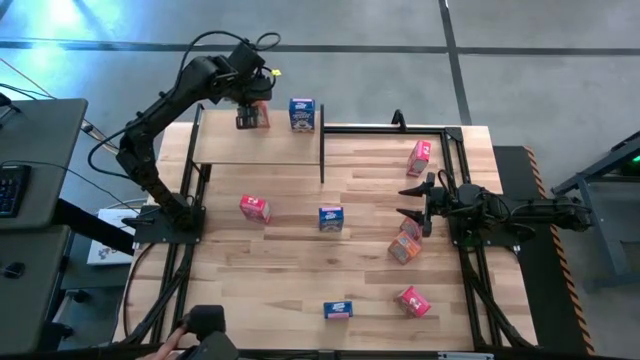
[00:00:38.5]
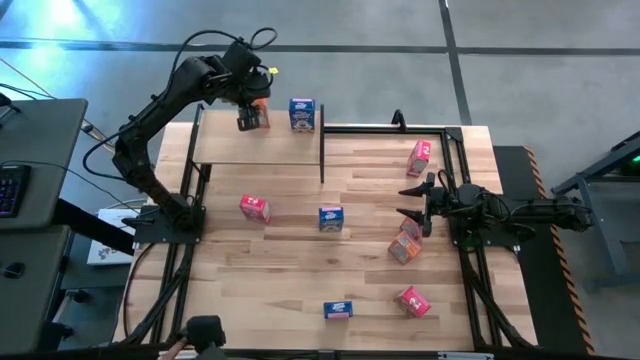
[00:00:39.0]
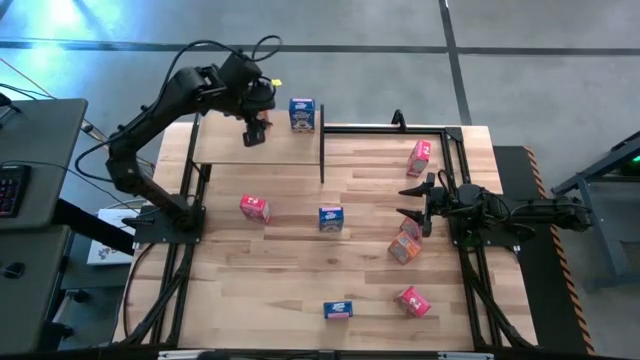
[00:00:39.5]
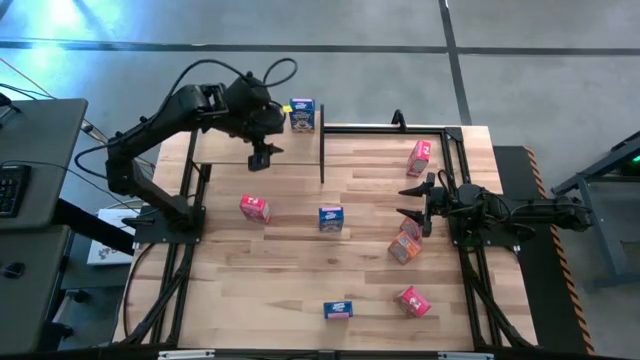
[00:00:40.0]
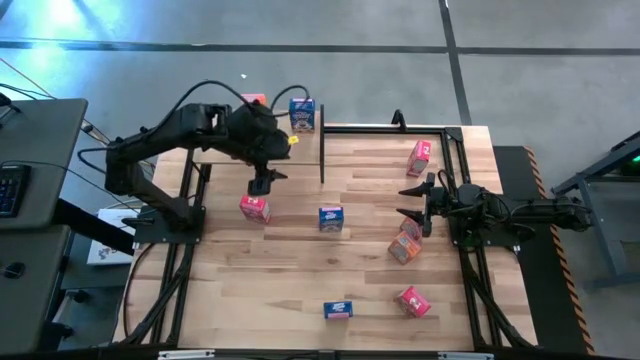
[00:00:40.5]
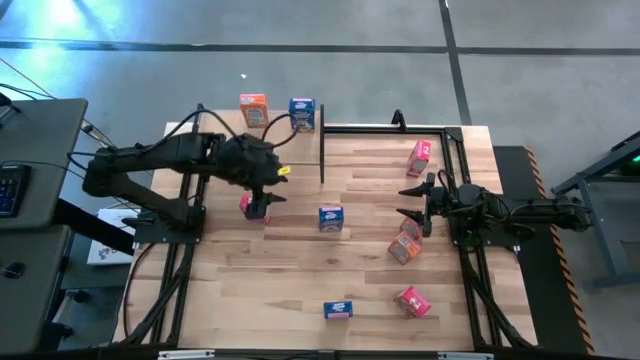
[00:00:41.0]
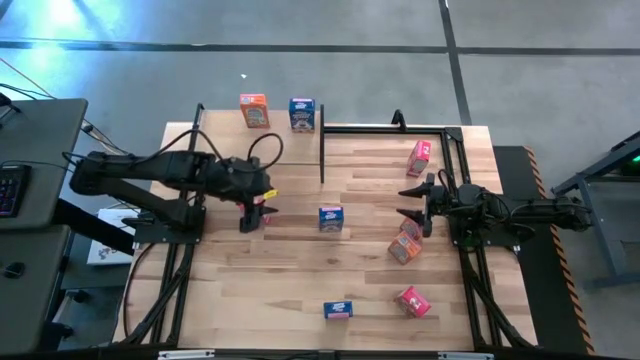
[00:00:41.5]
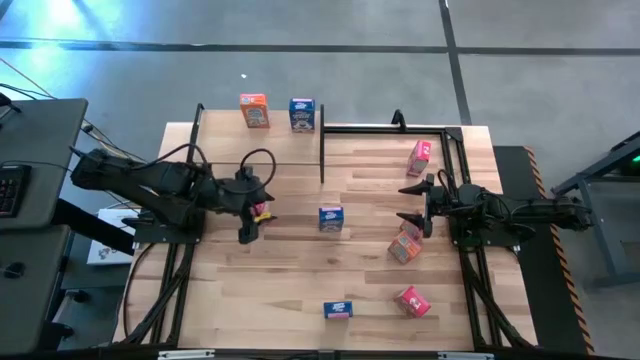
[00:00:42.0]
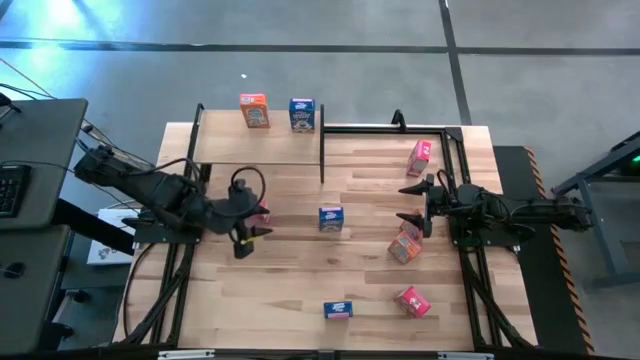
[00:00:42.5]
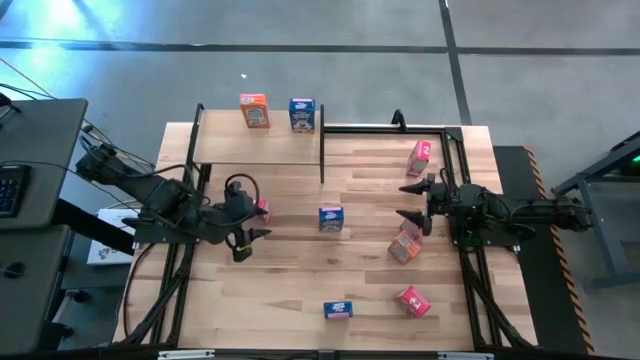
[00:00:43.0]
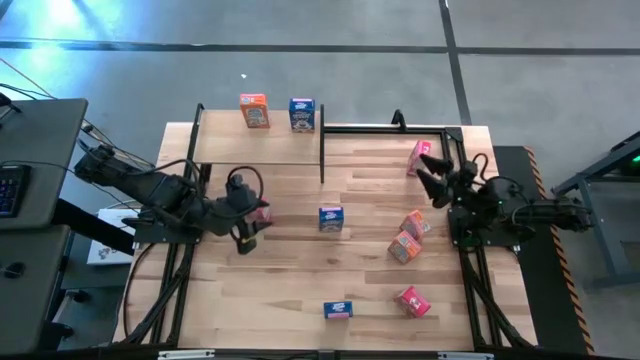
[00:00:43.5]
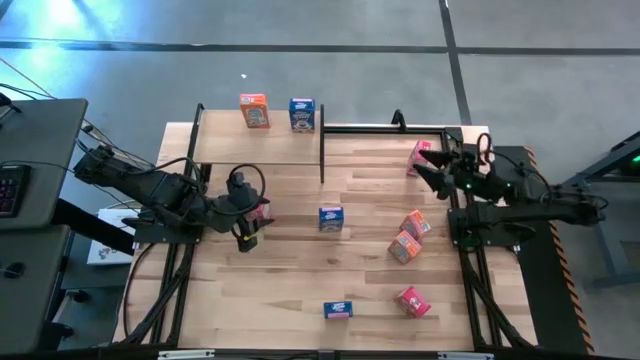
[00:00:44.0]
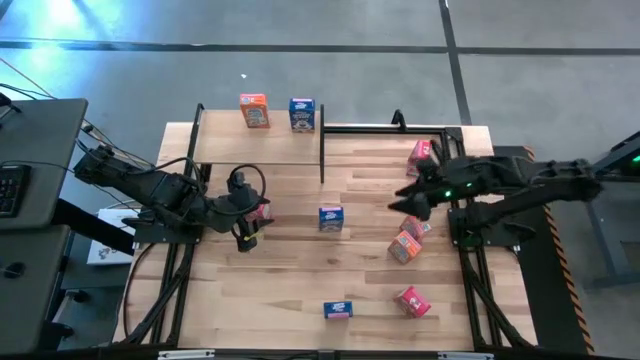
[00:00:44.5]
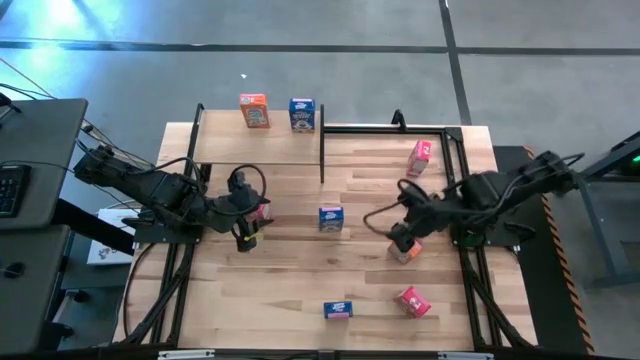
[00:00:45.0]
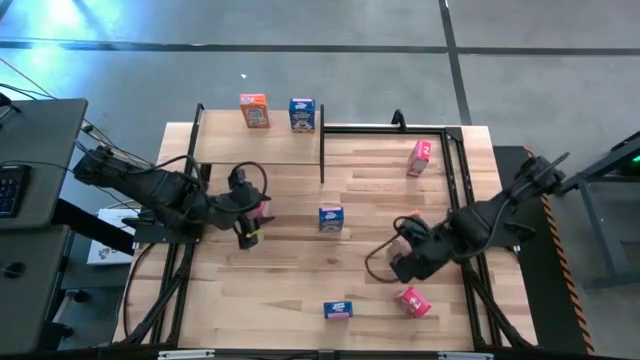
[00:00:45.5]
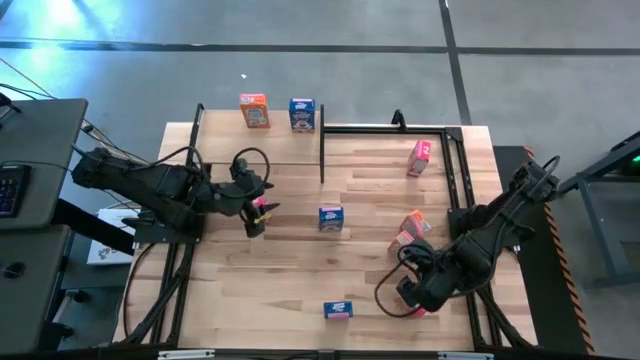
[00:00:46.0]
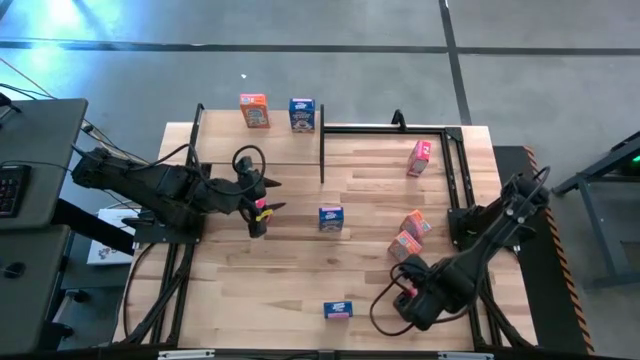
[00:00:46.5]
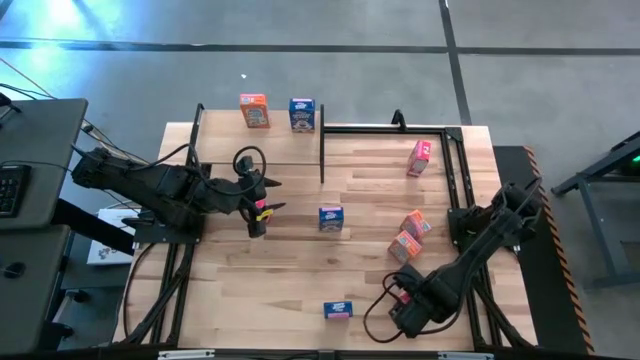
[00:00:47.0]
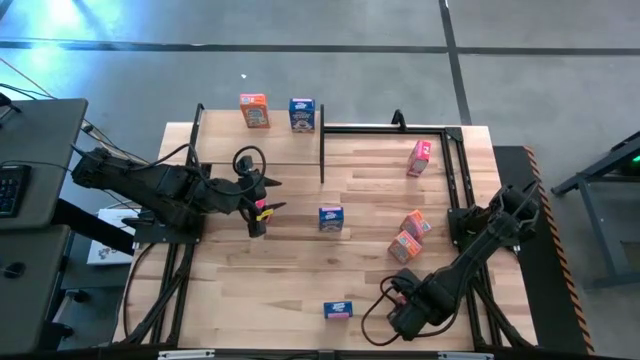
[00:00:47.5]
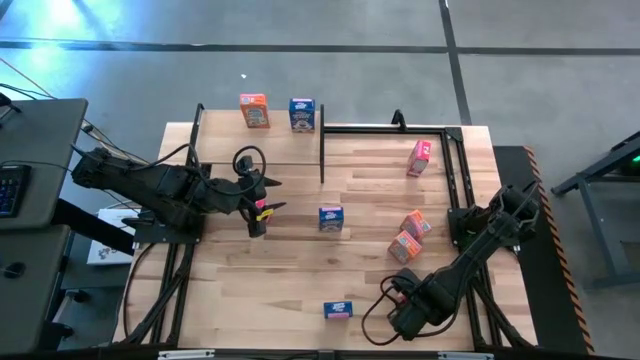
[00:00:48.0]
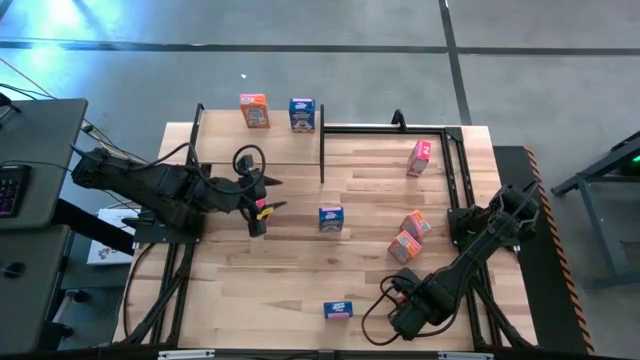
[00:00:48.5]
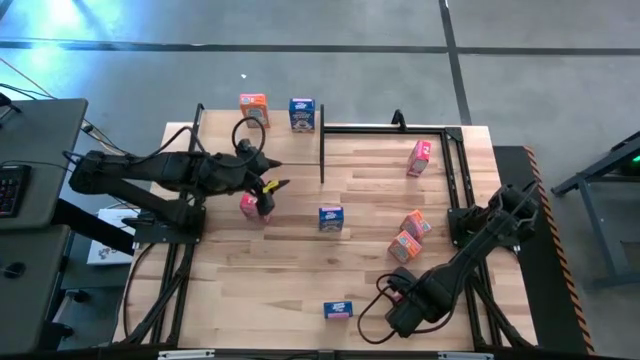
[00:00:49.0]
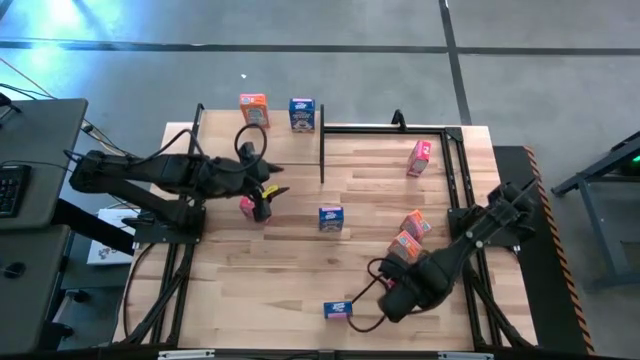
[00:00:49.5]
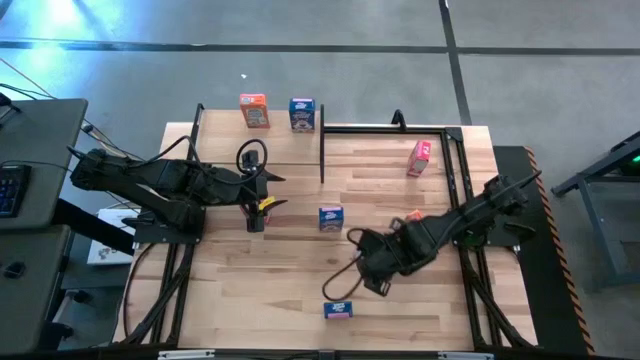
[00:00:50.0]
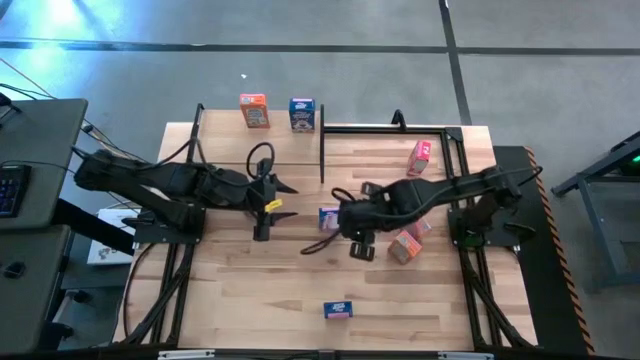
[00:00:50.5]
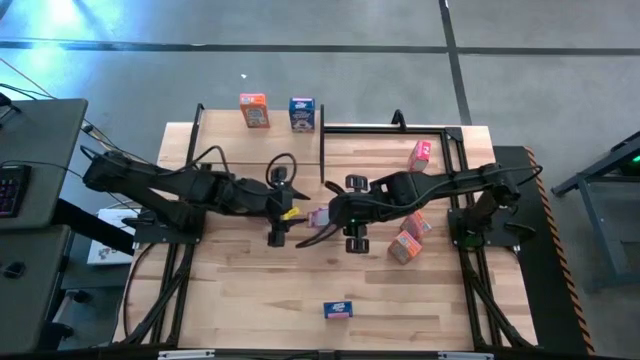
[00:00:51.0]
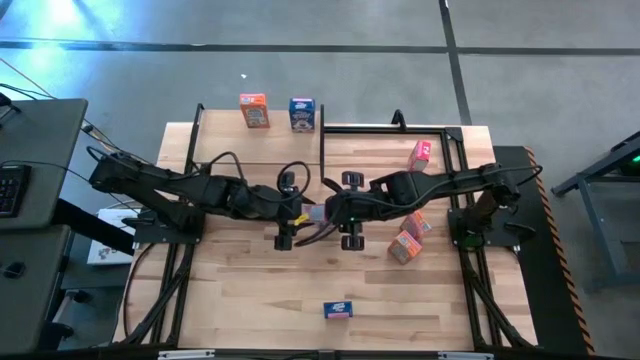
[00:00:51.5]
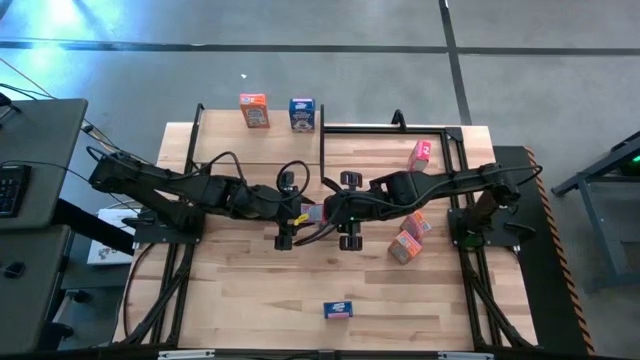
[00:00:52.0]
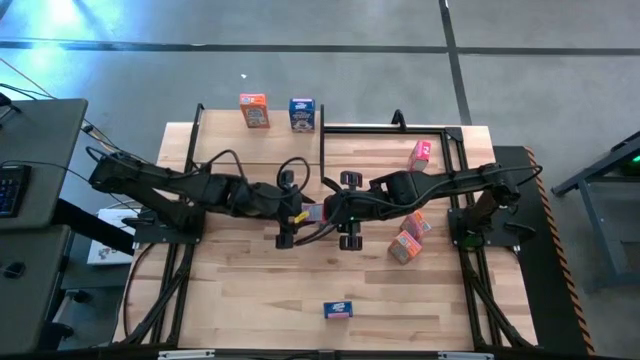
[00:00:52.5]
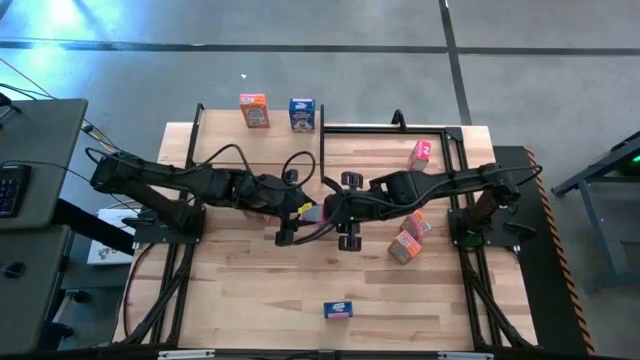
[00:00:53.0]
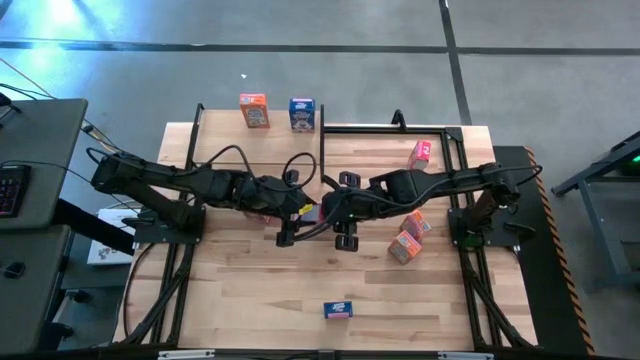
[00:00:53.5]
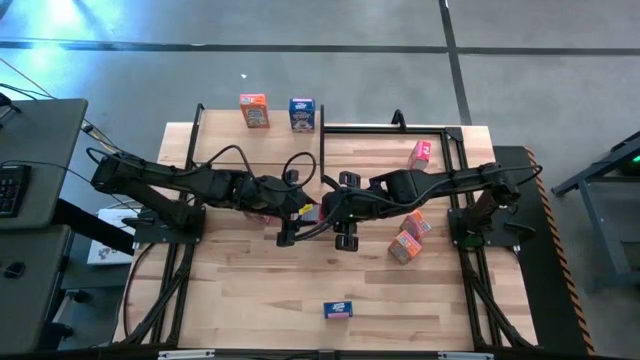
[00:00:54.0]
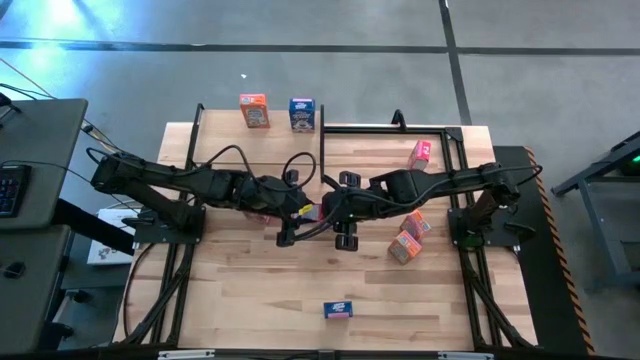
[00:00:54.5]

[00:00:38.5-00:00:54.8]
Task: Stack cereal on shelf
Put the bottom right red cereal box on the the shelf

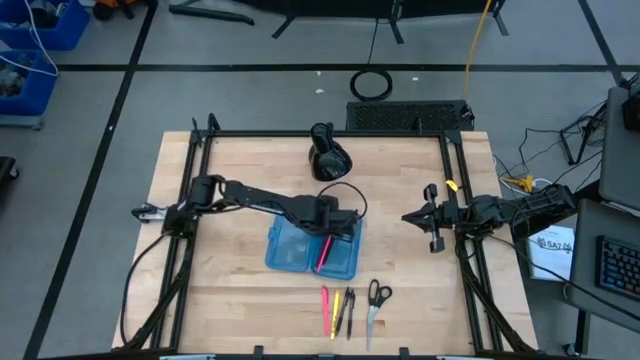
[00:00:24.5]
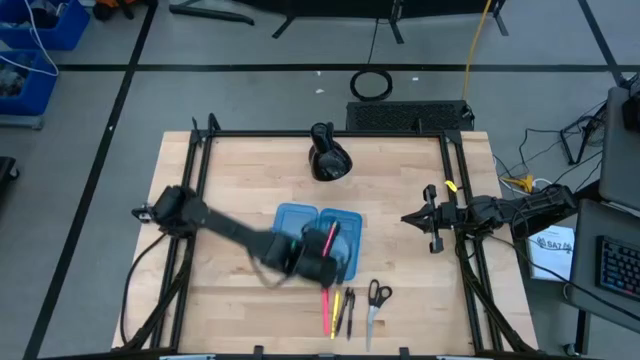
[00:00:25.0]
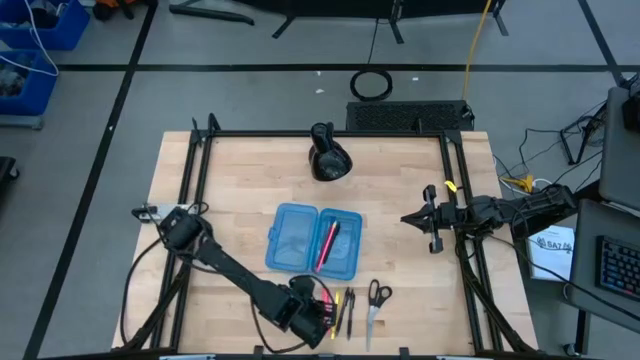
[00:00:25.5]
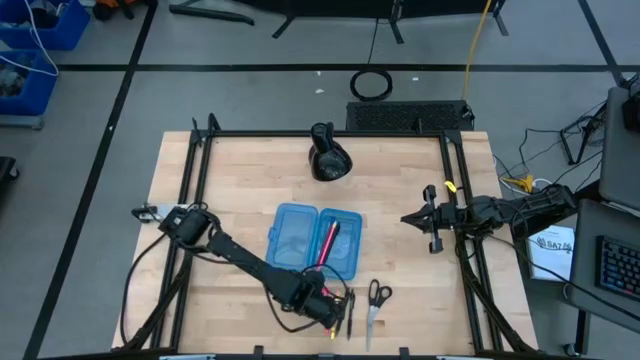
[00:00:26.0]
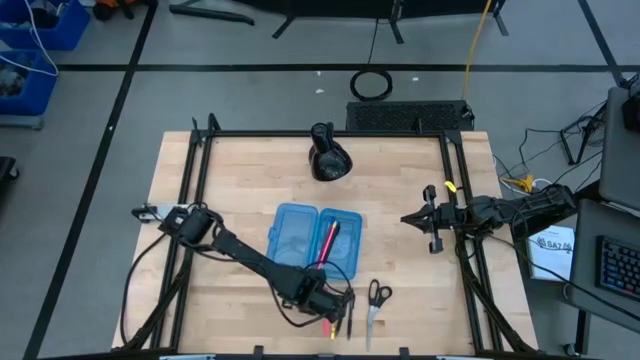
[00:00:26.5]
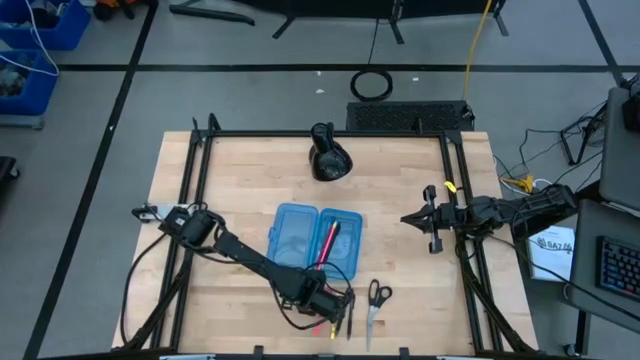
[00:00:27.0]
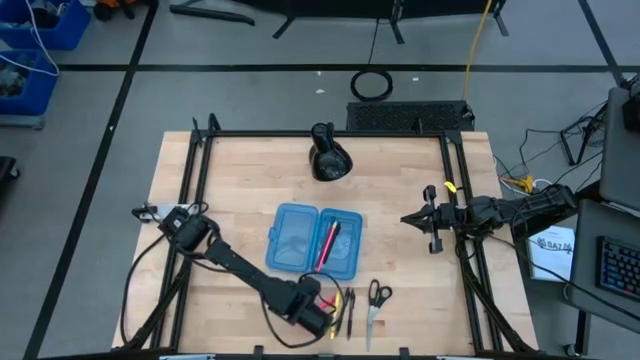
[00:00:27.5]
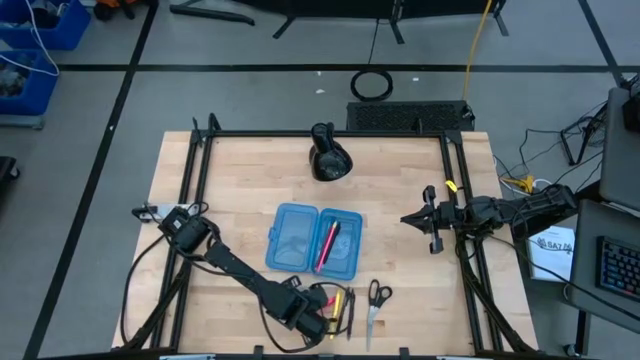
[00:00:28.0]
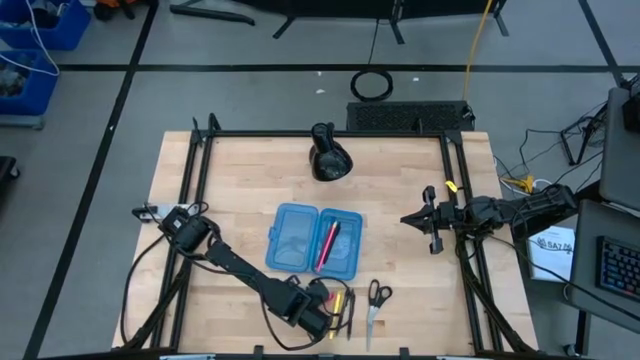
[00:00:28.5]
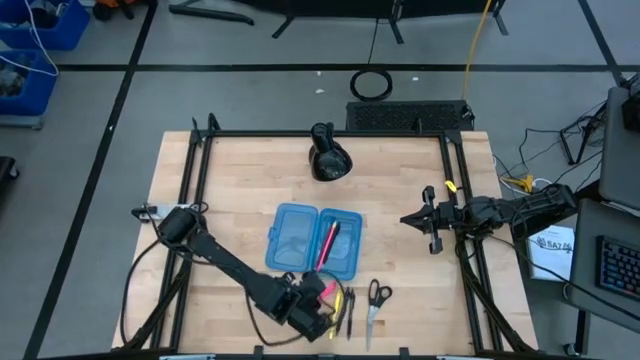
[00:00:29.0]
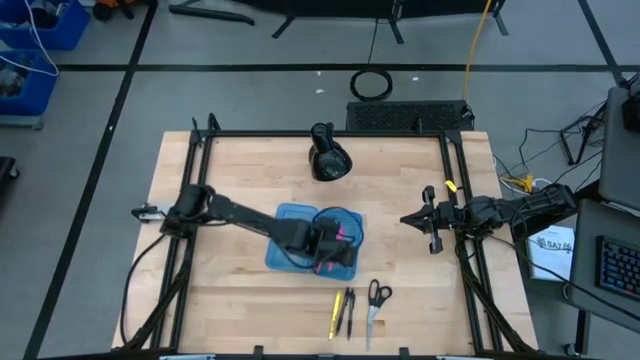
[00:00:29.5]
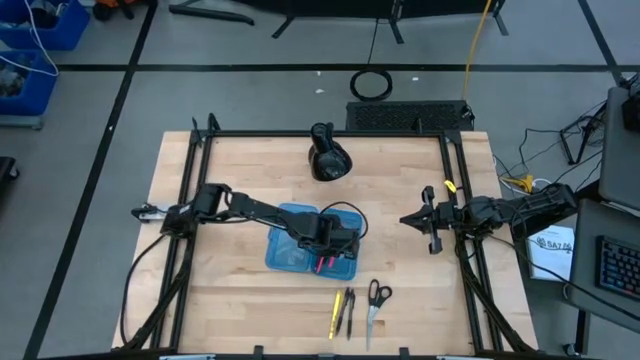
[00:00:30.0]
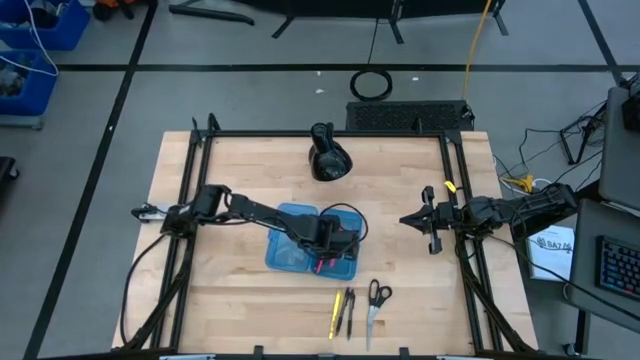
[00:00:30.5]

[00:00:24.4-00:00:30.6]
Task: Pick & place school supplies into a supply box
Put the pink pen into the blue supply box
